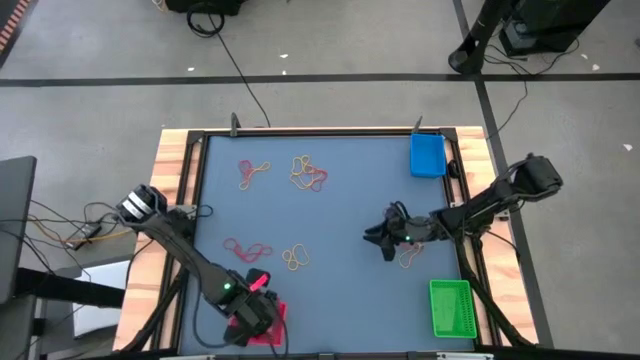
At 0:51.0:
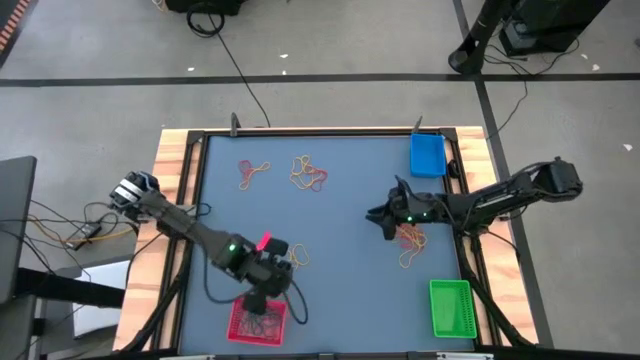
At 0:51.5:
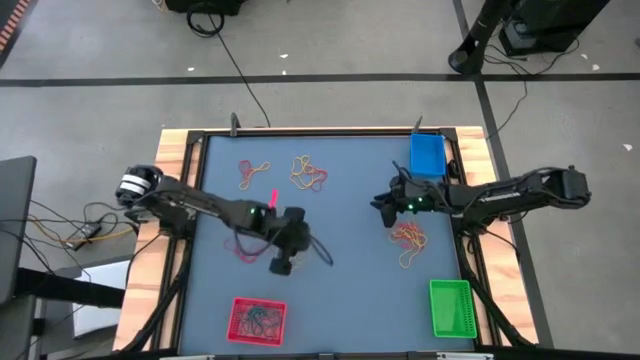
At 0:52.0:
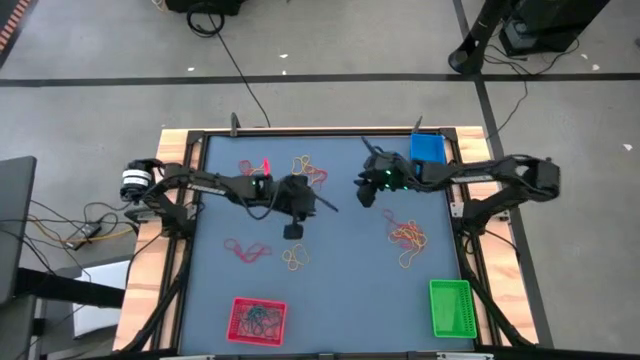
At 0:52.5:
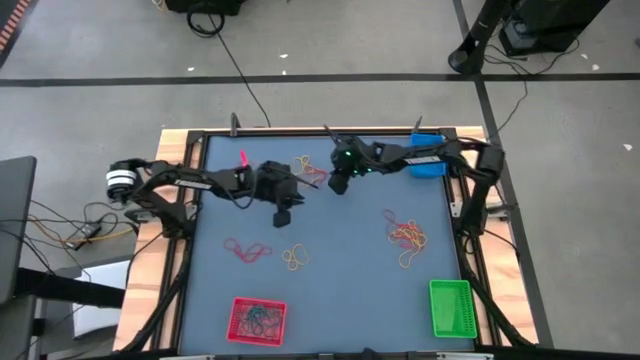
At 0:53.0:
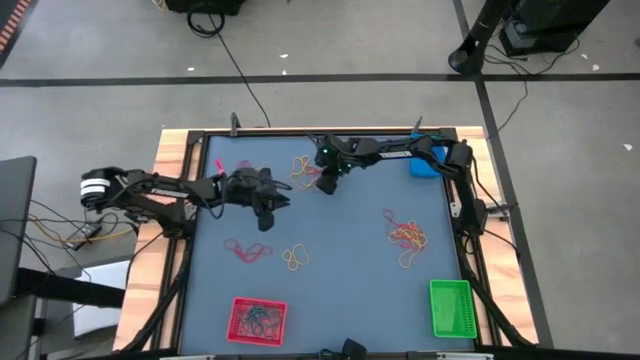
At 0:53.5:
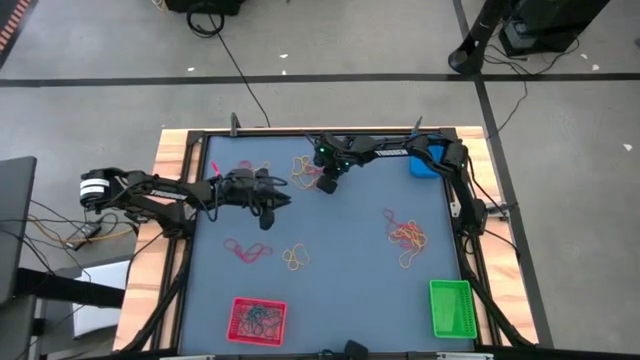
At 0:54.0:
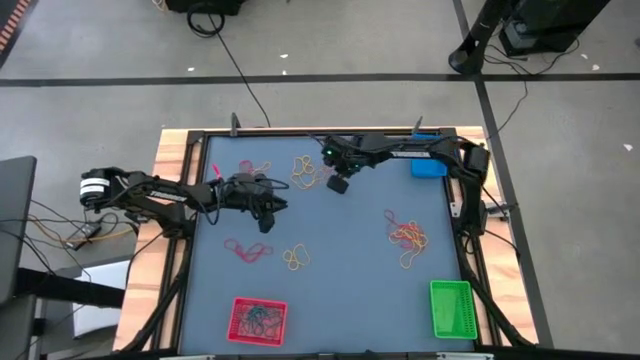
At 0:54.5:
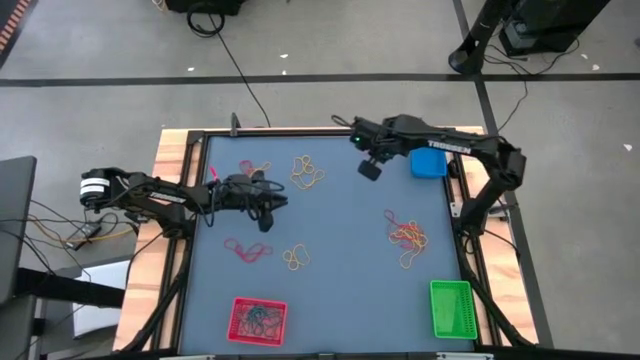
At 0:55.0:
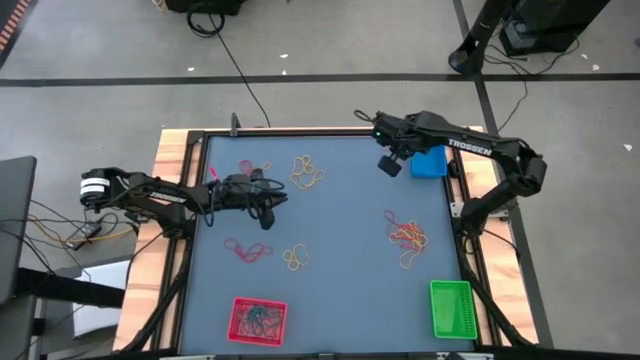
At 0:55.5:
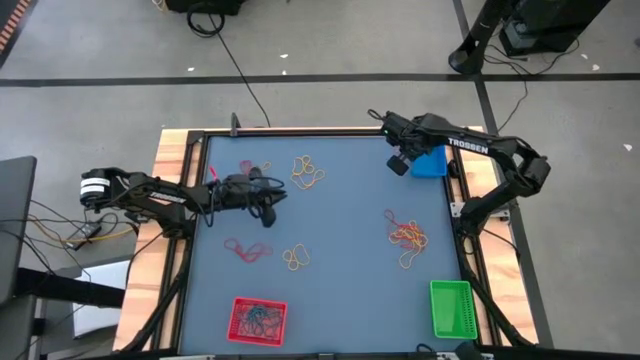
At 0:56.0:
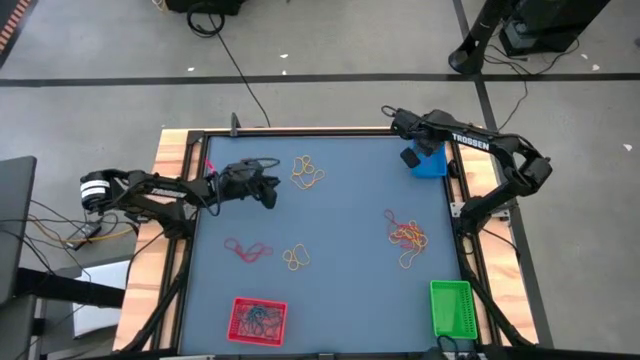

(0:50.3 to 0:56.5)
Task: Sort rubber bands into baskets
Put the red rubber band into the blue bin

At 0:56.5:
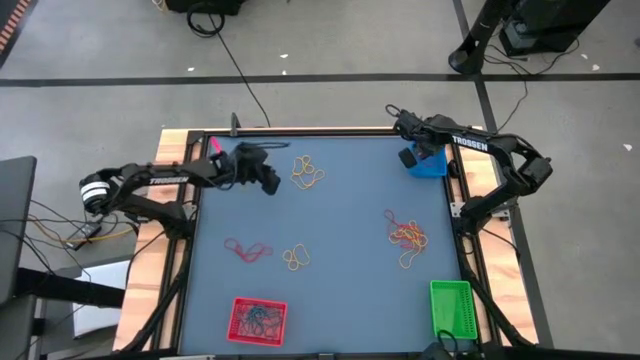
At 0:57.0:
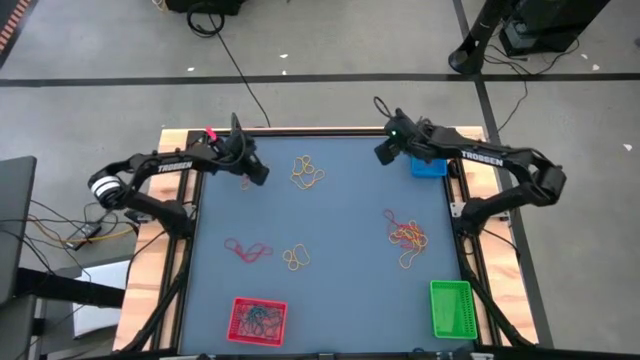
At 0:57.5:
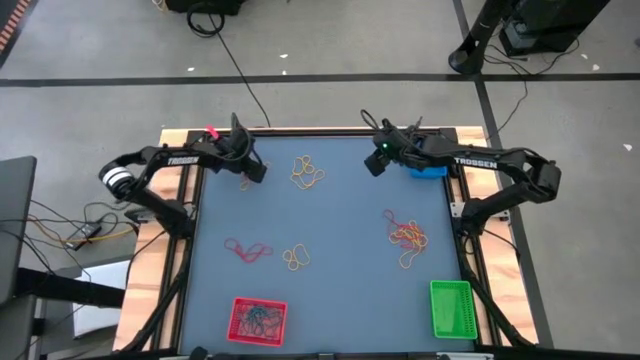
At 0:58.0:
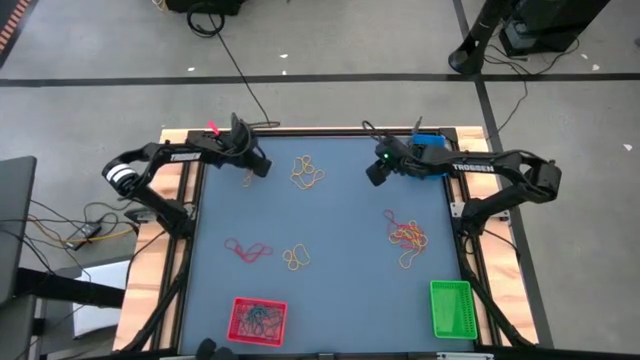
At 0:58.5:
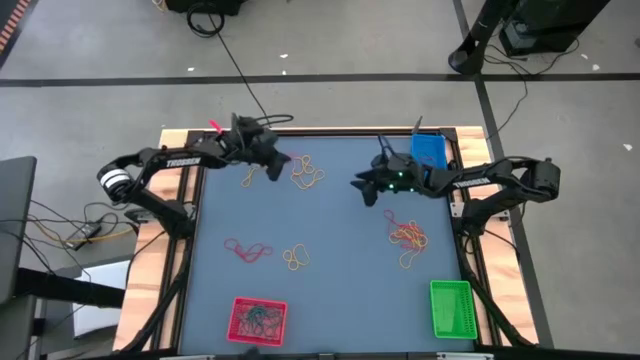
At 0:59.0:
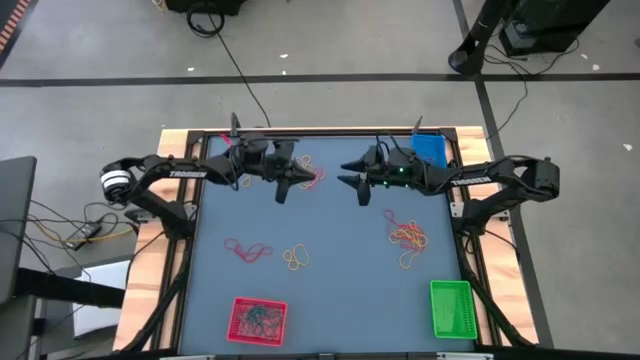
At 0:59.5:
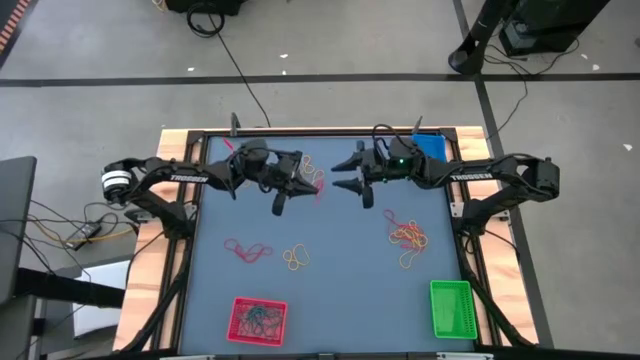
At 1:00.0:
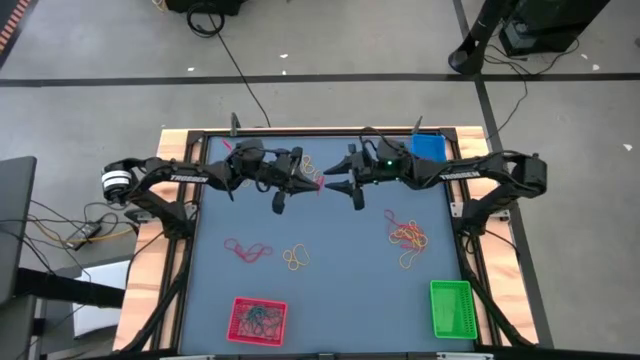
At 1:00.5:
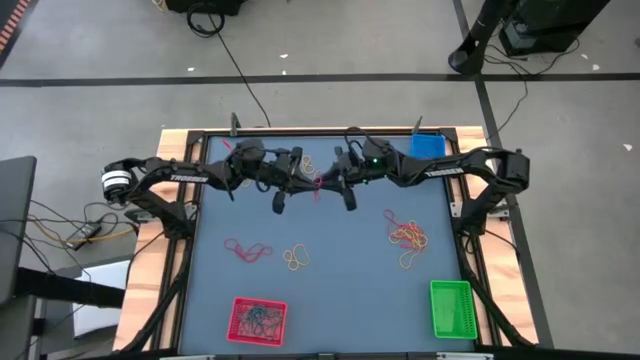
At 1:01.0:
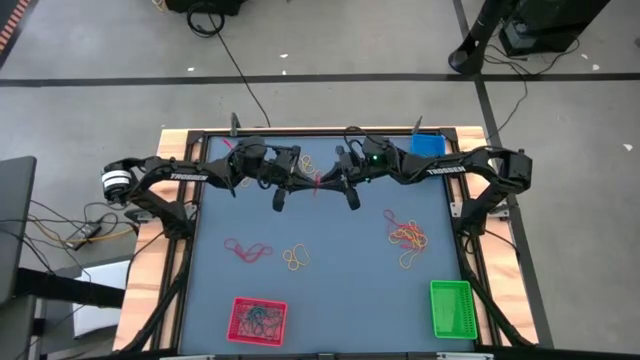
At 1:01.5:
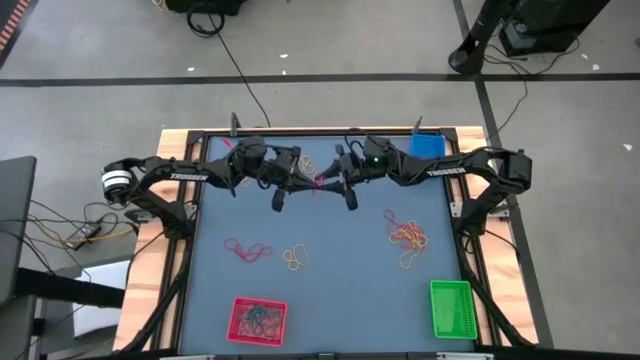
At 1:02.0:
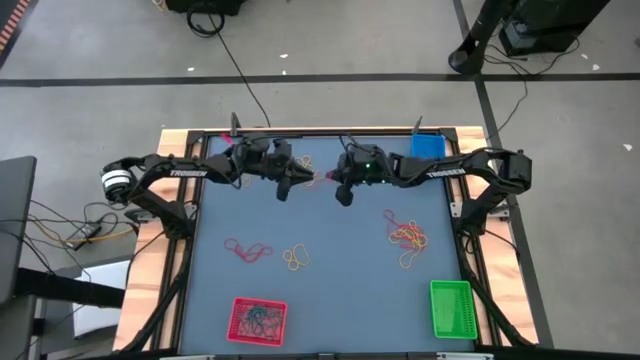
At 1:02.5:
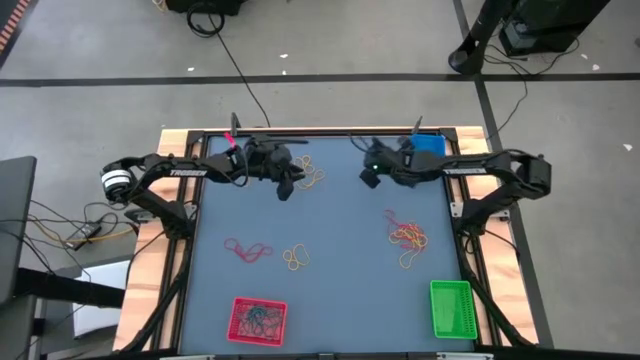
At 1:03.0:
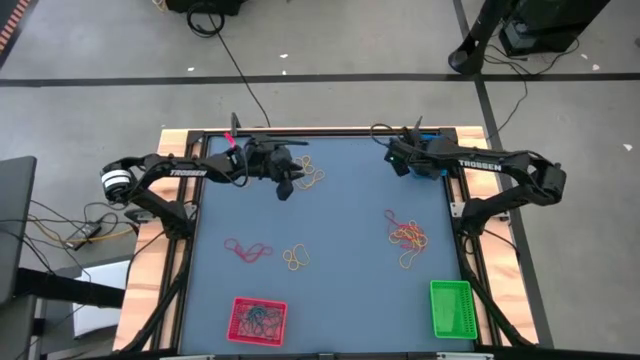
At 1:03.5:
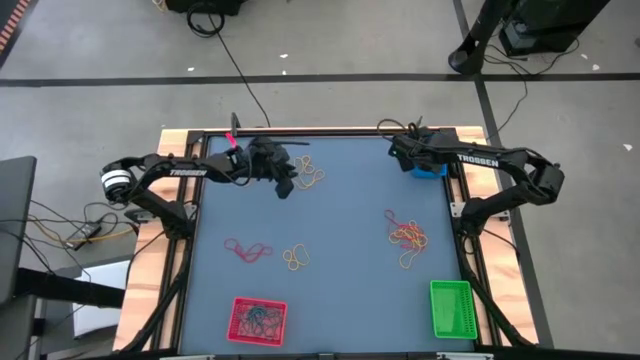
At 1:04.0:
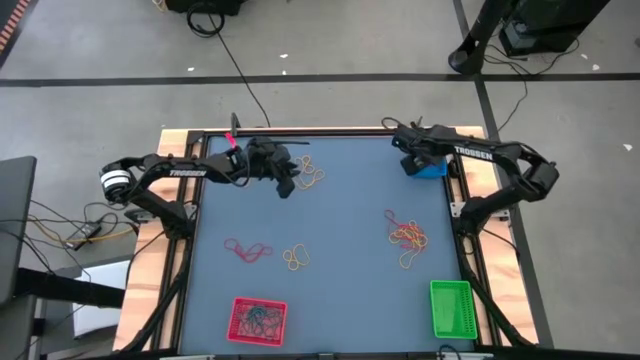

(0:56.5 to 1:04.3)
Put the red rubber band into the blue bin

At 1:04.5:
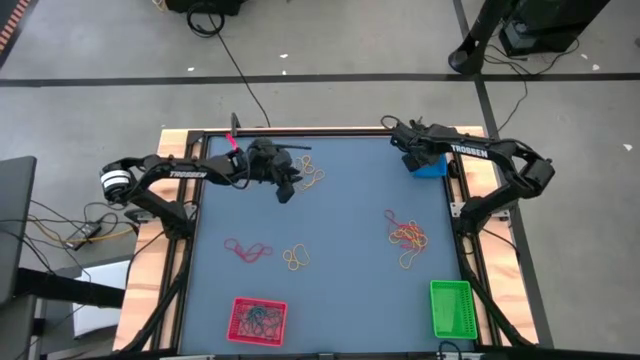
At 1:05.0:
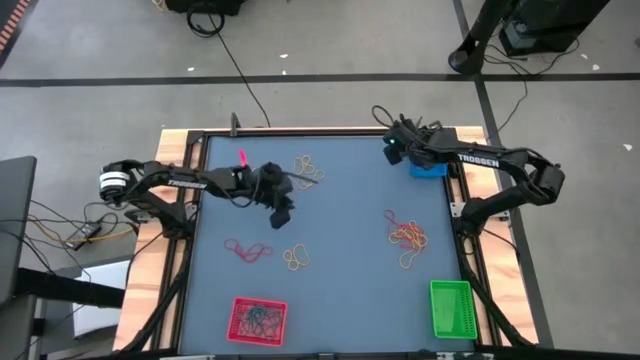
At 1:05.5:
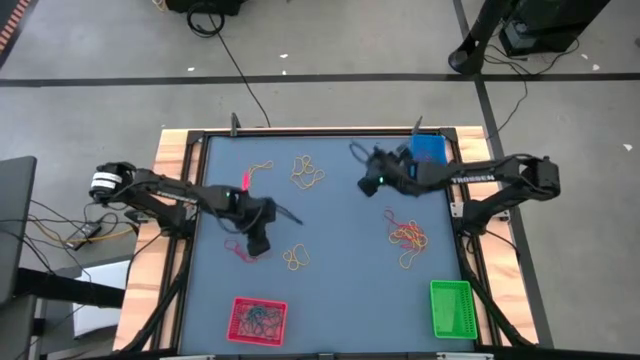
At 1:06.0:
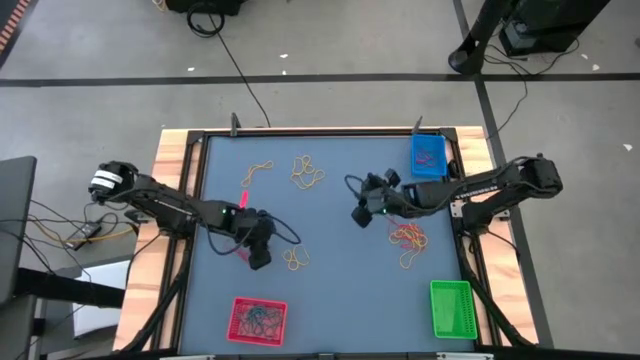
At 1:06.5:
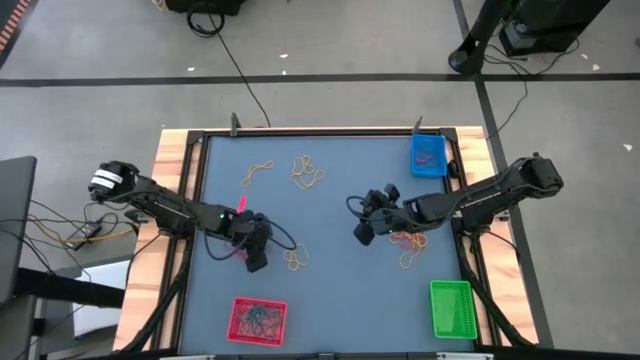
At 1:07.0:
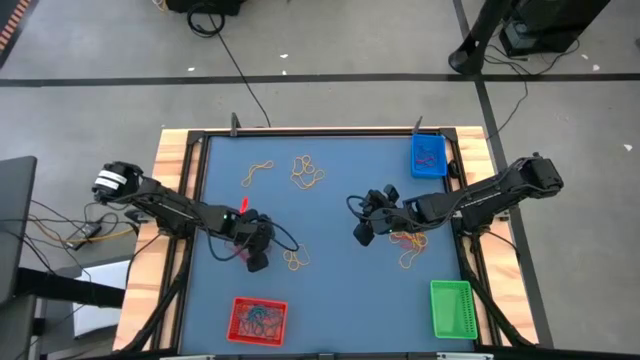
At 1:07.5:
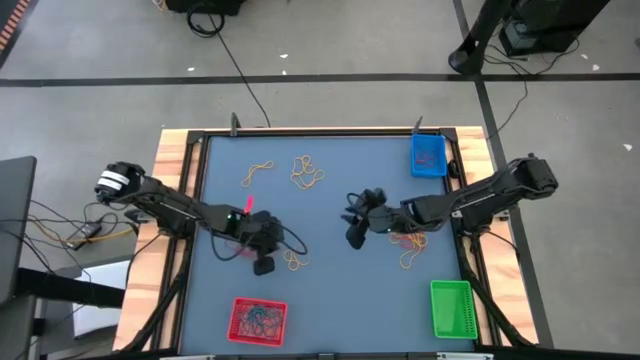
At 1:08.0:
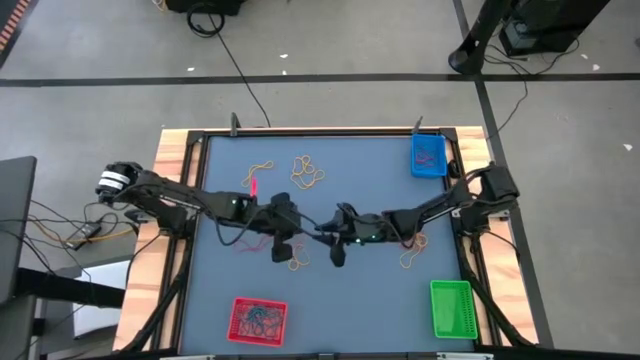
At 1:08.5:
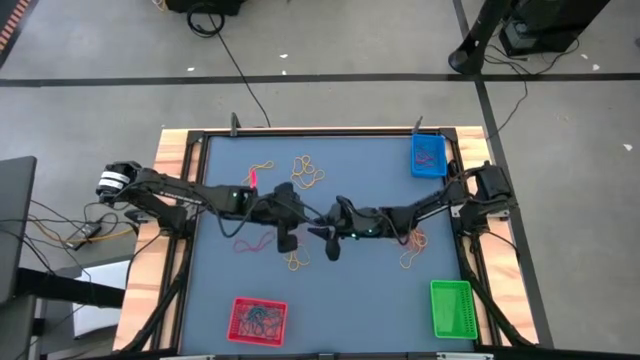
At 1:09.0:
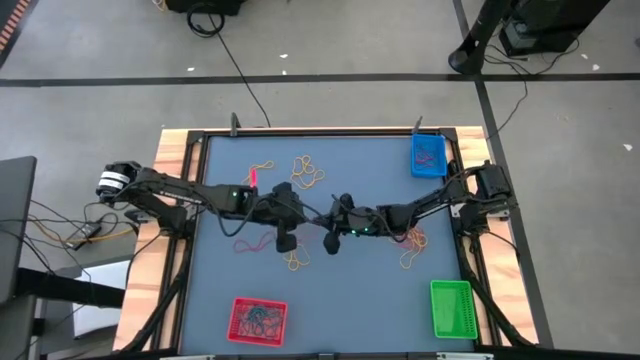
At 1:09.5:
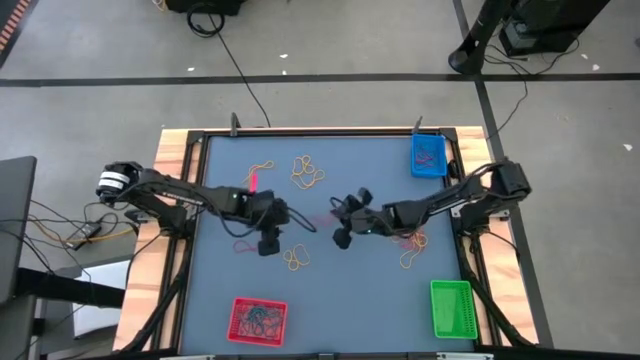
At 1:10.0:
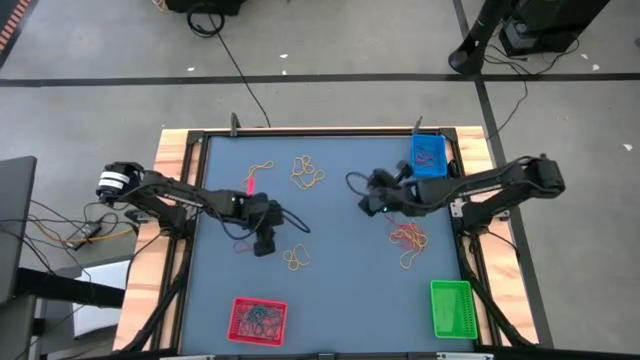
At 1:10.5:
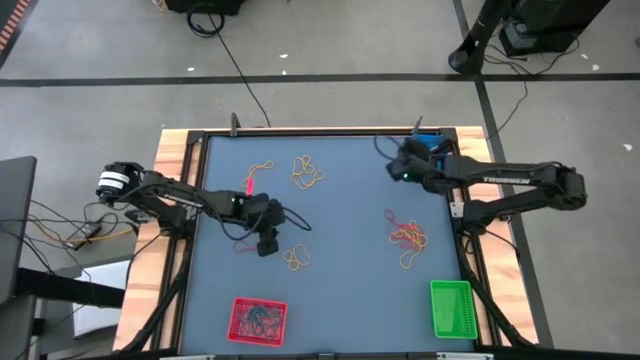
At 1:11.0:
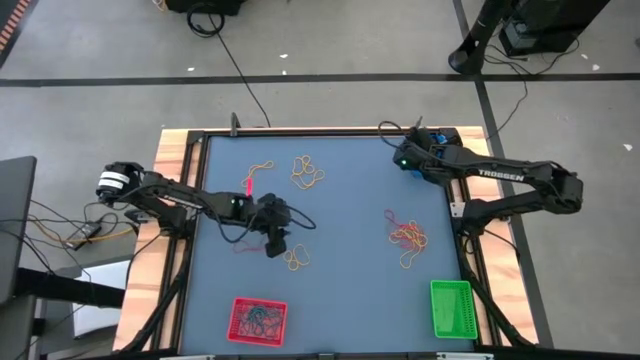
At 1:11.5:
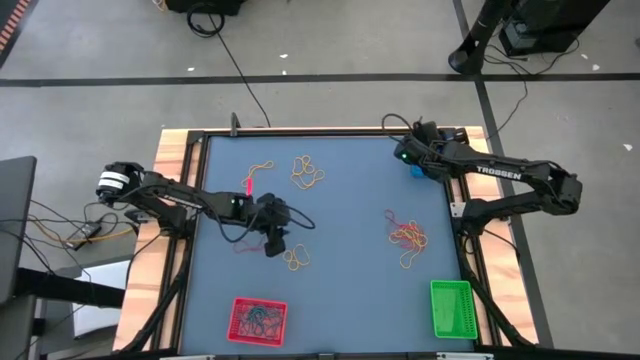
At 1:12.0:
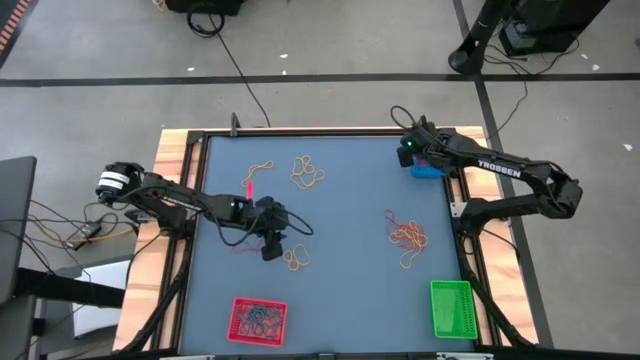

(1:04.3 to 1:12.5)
Put the red rubber band into the blue bin
